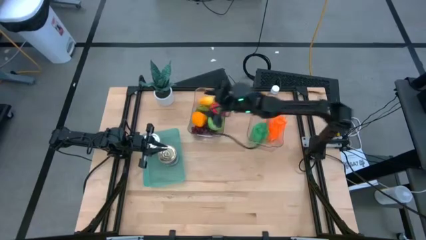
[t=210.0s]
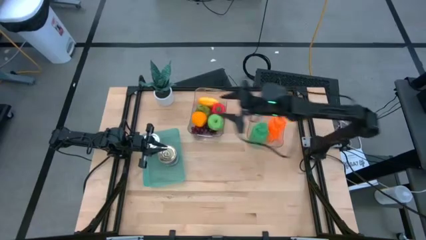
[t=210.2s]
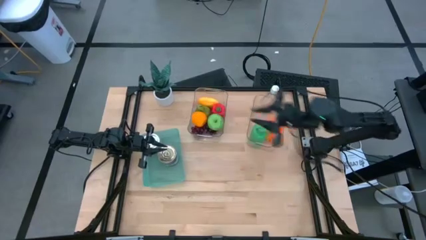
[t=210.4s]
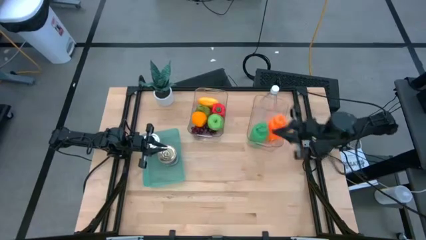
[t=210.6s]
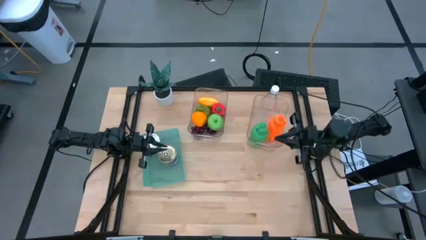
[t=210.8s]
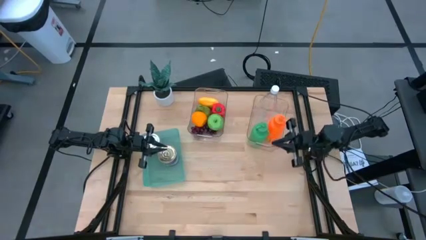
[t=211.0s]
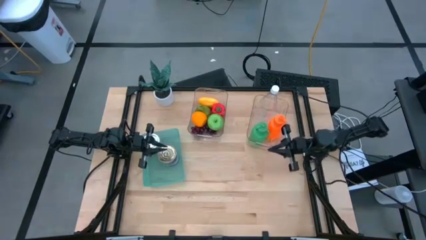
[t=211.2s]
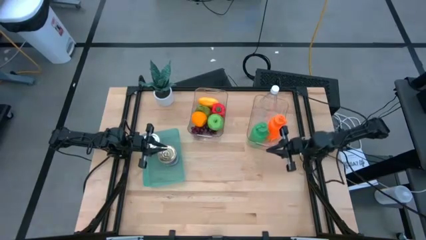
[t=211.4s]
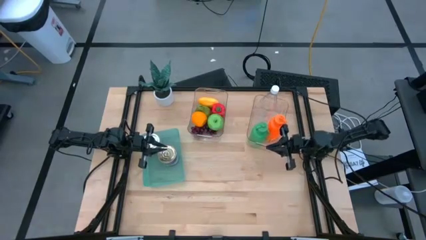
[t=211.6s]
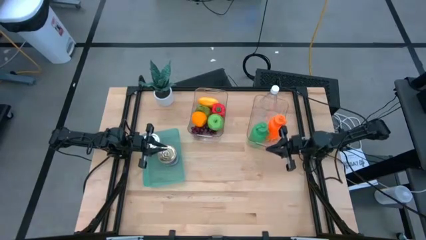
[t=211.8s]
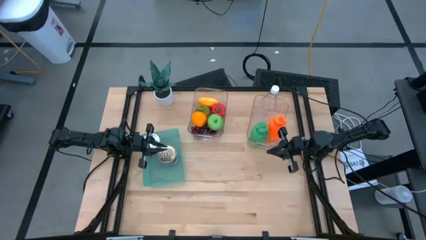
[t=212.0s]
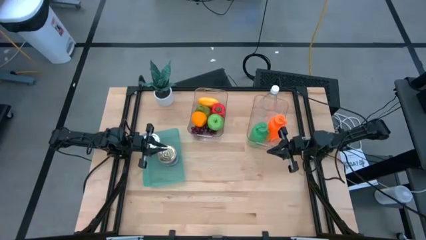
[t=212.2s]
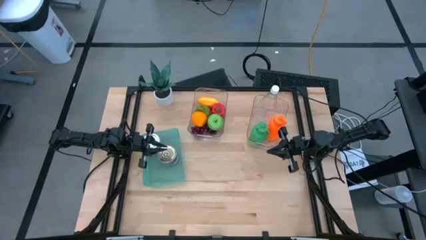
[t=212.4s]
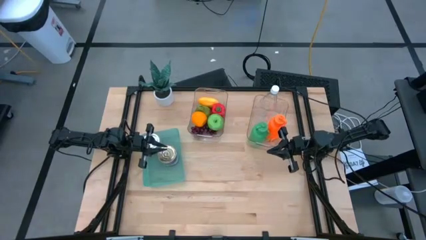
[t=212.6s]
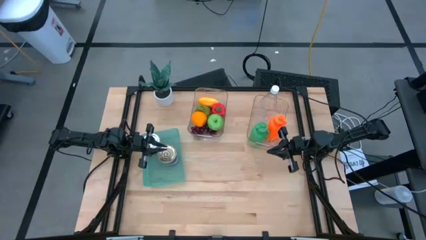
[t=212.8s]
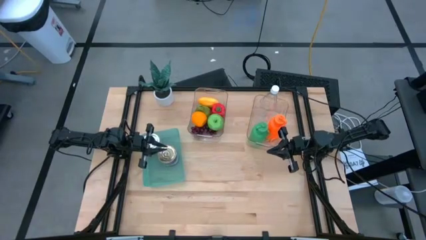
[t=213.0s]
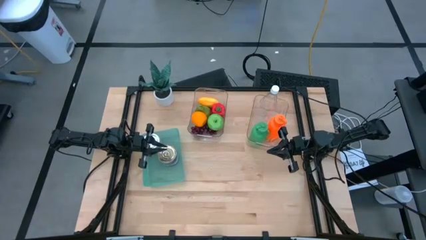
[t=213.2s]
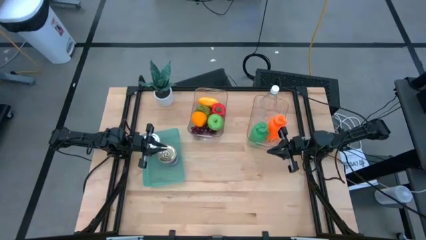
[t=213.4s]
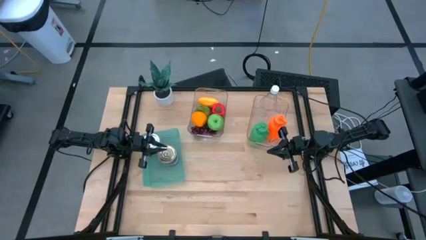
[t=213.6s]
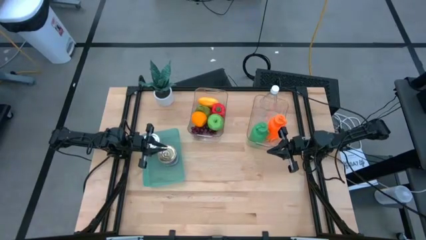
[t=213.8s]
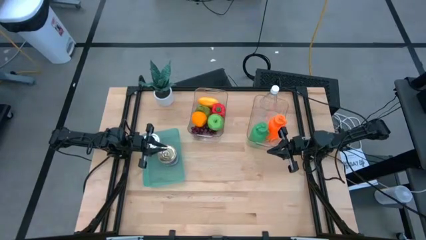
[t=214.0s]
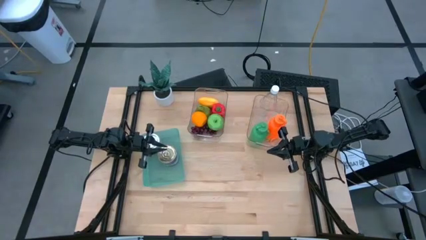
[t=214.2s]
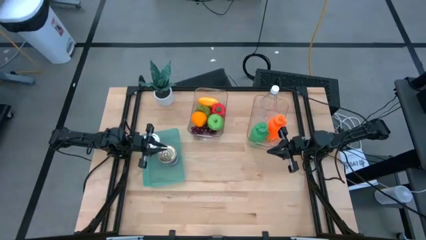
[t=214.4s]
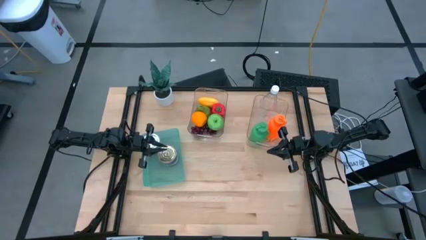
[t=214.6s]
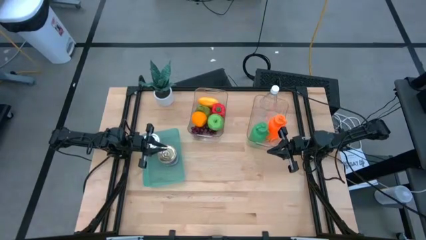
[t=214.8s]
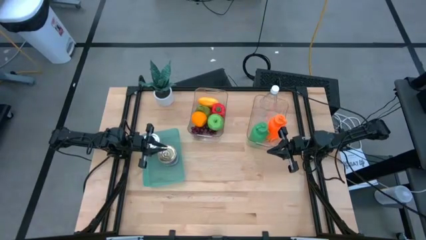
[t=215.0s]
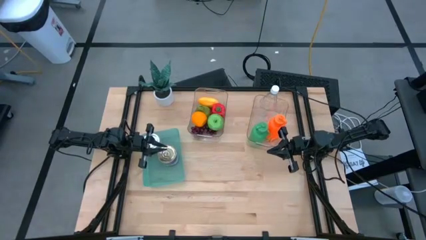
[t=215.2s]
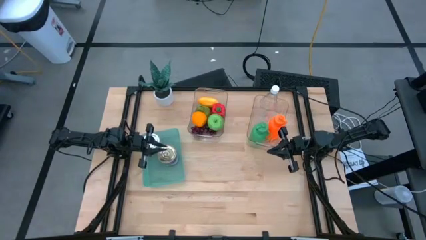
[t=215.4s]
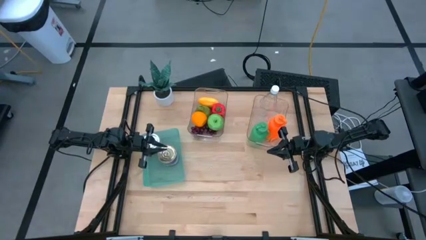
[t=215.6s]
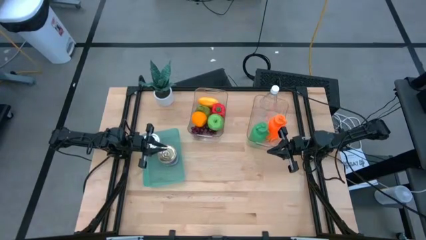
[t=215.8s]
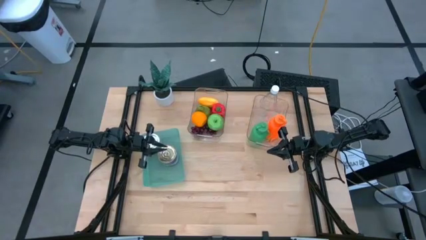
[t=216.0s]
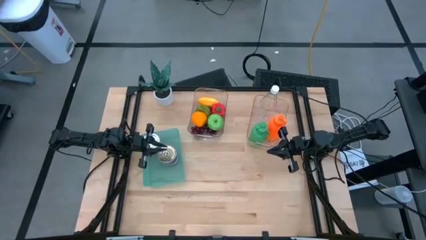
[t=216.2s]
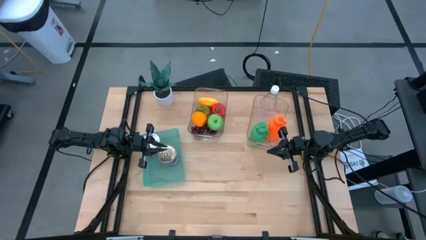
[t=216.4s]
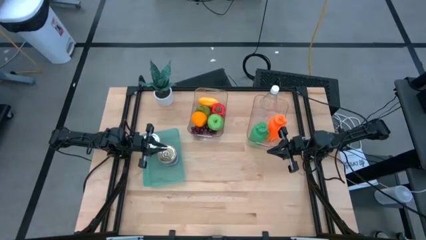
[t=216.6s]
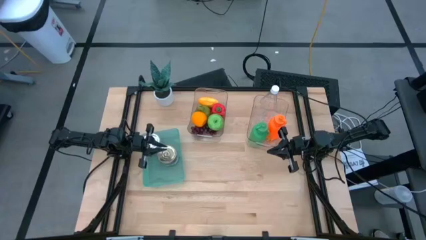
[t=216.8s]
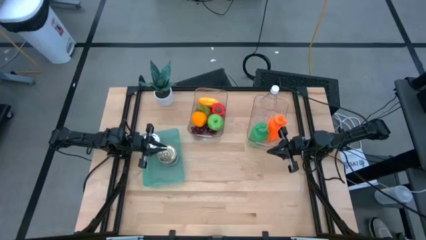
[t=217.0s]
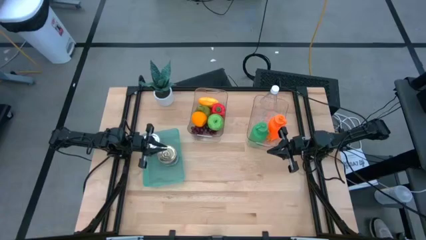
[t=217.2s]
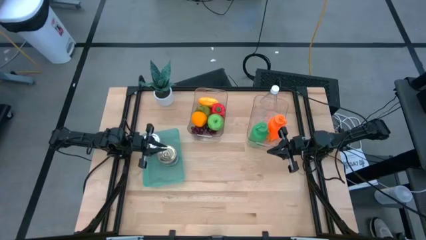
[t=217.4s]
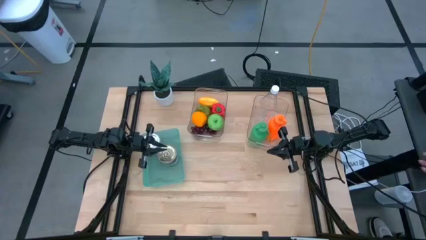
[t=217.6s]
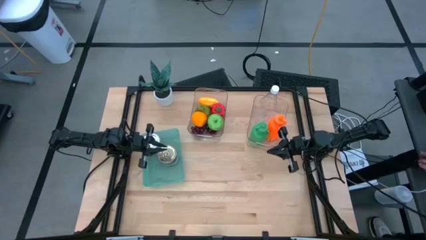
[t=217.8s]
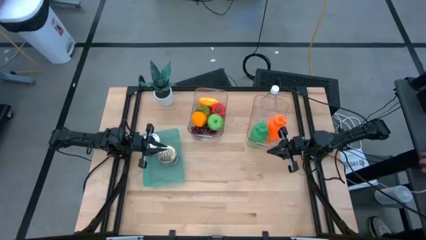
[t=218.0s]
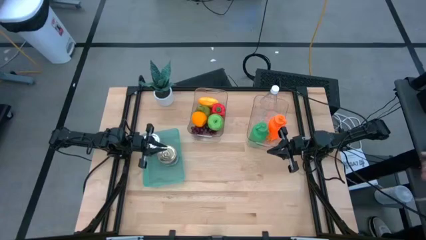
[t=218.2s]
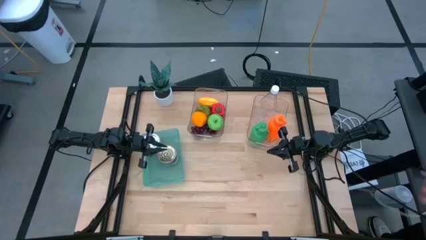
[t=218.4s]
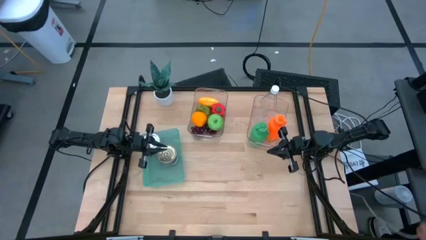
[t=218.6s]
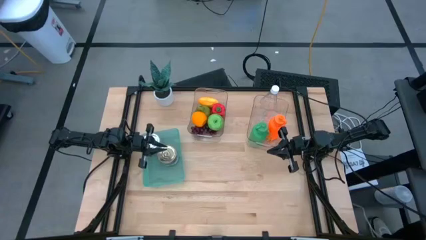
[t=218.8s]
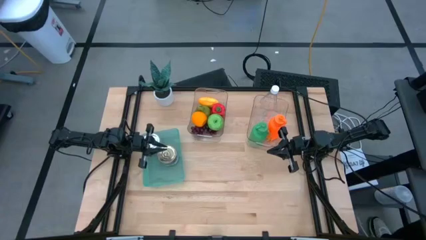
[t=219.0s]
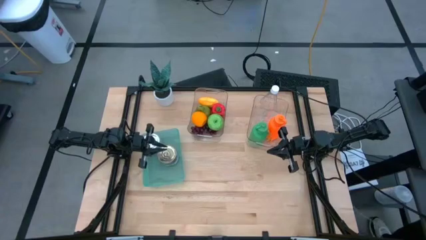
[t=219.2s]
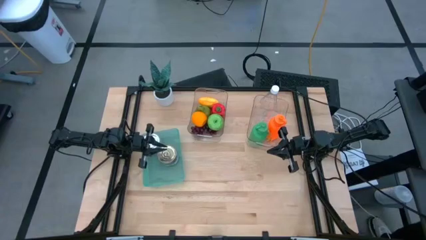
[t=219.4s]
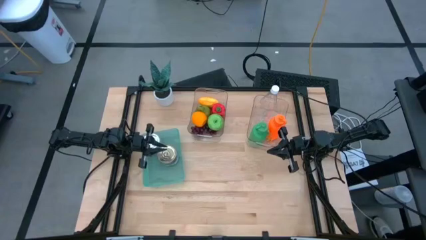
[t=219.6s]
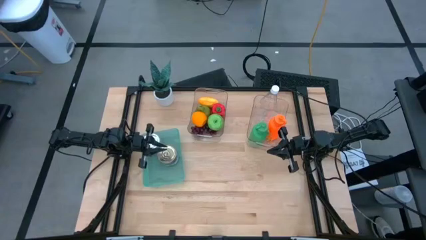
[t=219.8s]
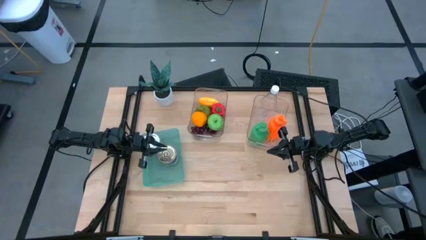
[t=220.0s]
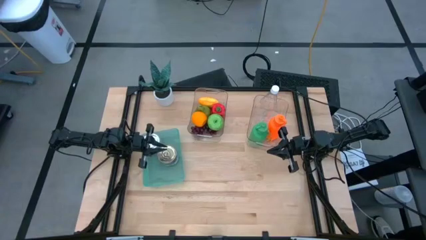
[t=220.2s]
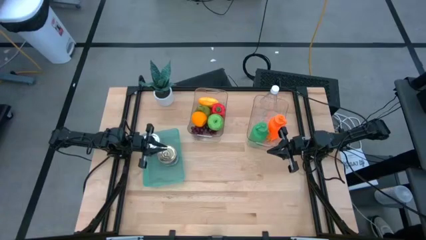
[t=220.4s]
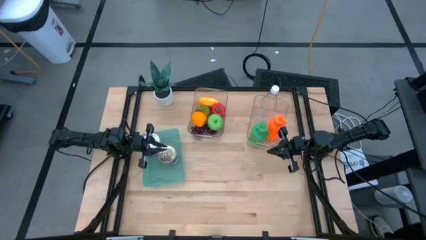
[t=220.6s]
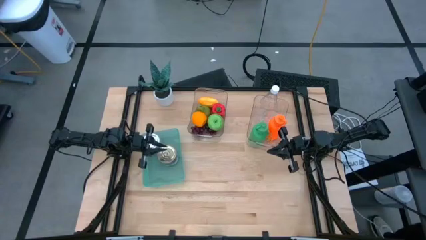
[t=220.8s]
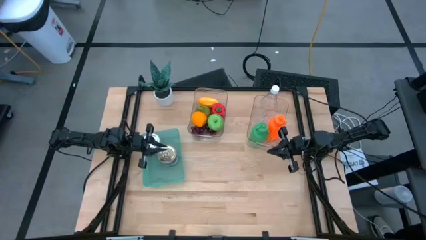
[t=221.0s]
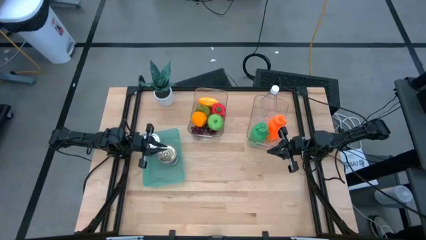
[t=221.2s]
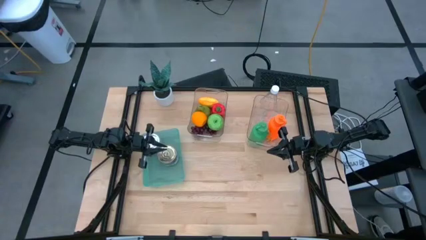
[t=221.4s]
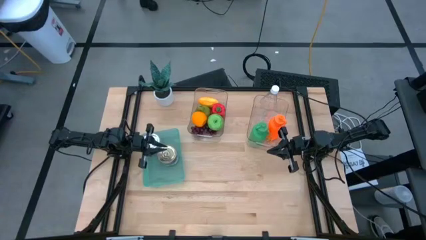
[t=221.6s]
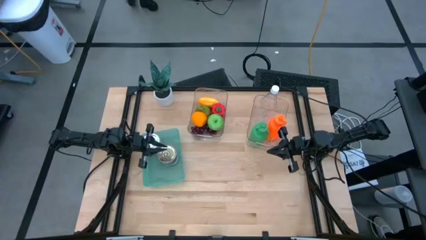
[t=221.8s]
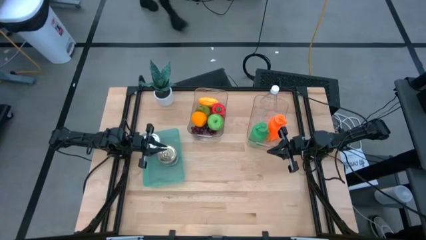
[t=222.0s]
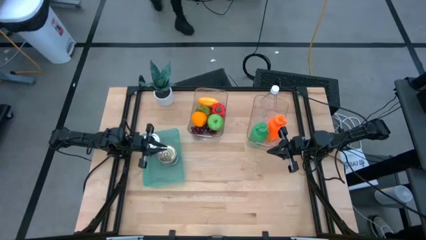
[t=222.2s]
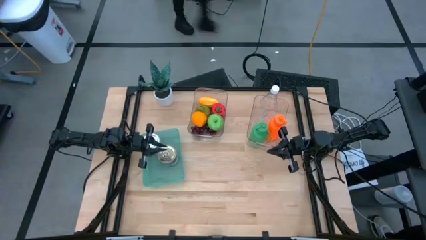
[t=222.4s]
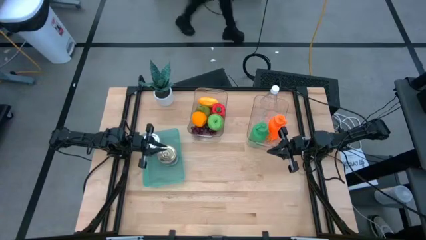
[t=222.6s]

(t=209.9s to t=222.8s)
Task: Pick & Place Food Item
Return to Home Position
